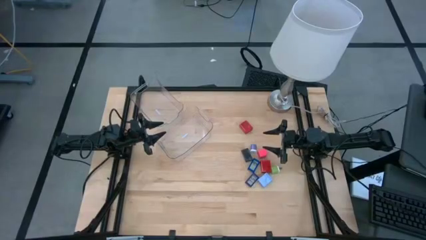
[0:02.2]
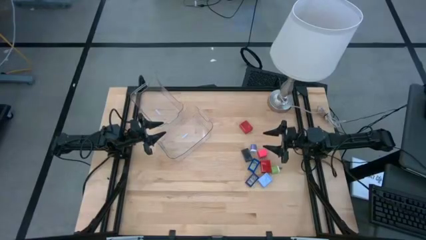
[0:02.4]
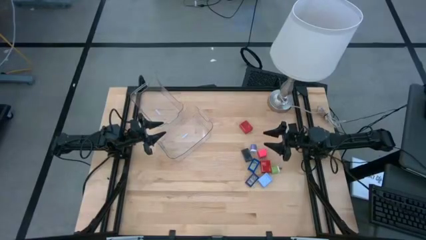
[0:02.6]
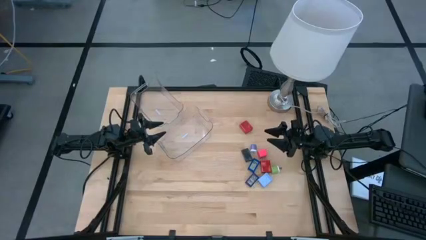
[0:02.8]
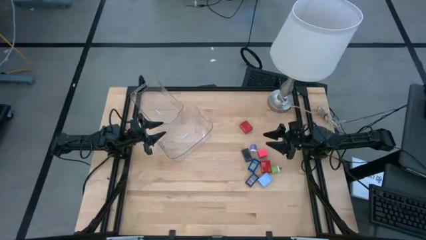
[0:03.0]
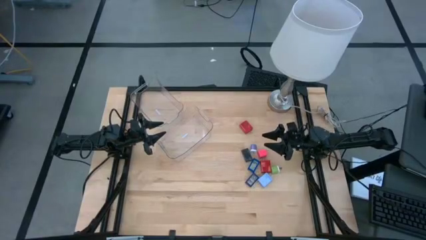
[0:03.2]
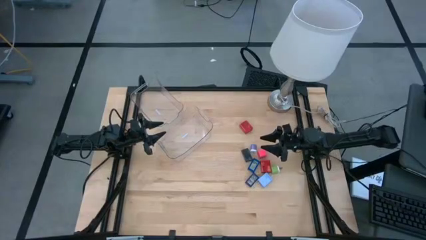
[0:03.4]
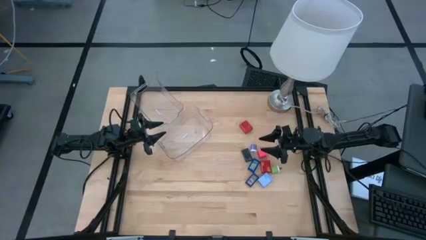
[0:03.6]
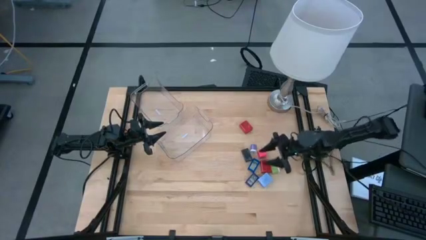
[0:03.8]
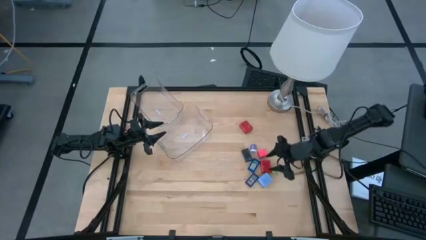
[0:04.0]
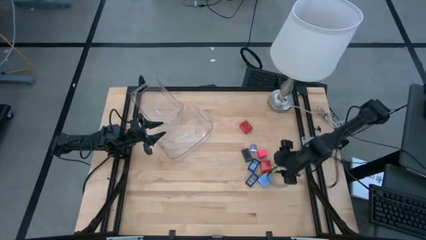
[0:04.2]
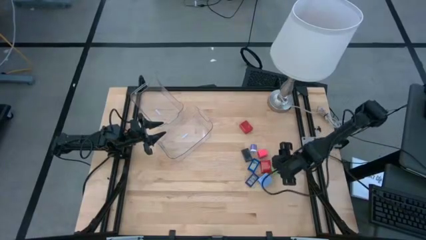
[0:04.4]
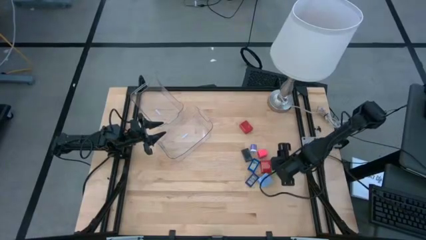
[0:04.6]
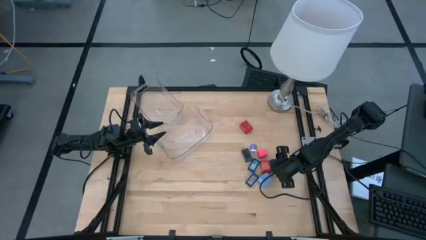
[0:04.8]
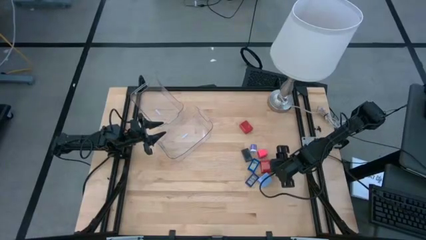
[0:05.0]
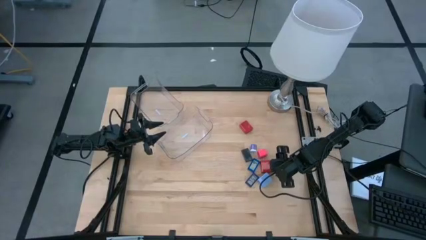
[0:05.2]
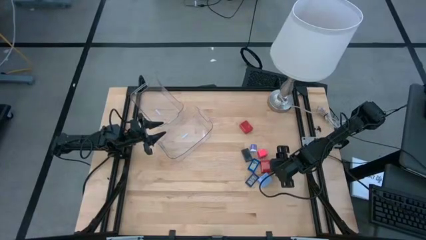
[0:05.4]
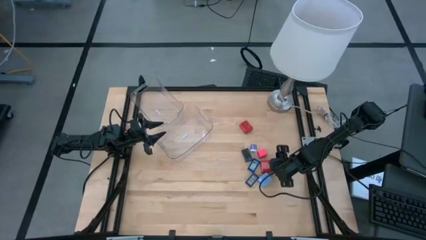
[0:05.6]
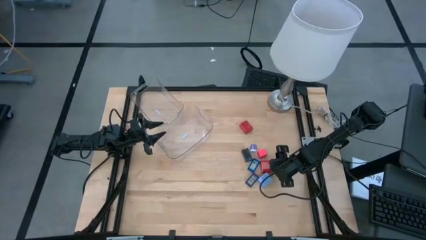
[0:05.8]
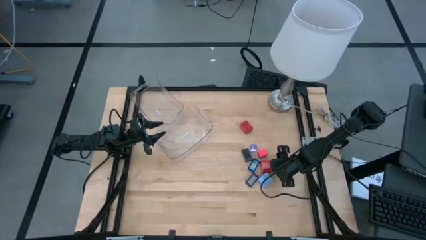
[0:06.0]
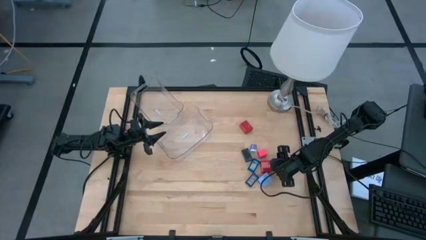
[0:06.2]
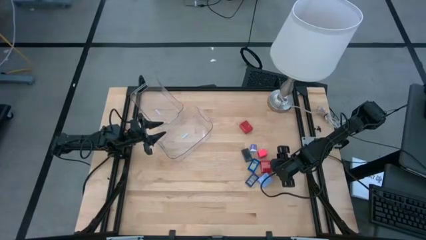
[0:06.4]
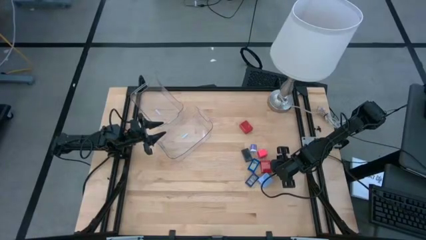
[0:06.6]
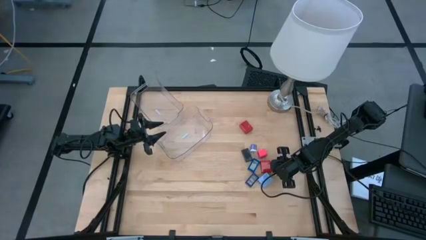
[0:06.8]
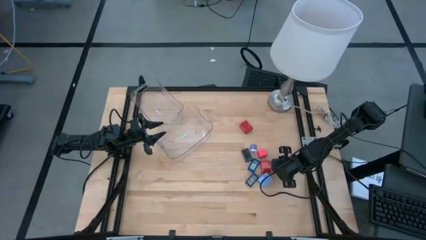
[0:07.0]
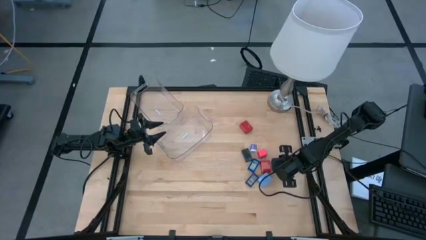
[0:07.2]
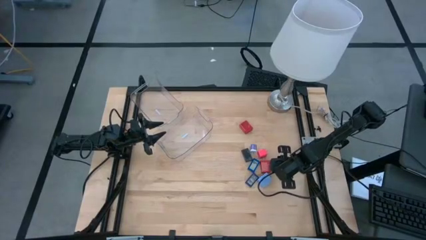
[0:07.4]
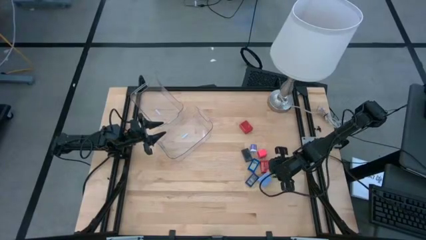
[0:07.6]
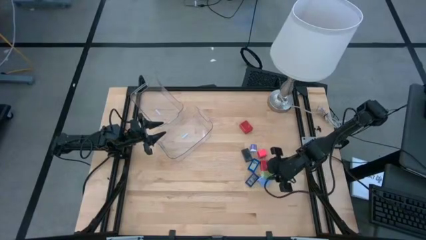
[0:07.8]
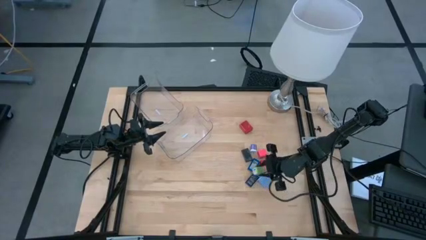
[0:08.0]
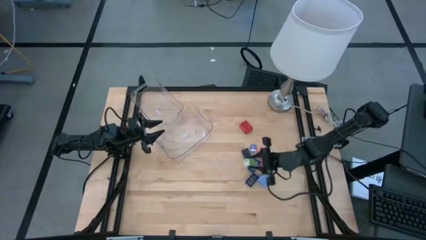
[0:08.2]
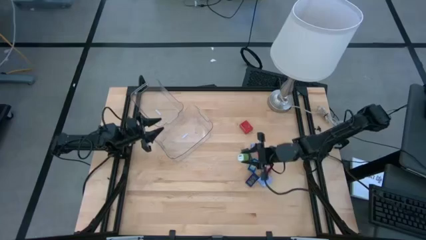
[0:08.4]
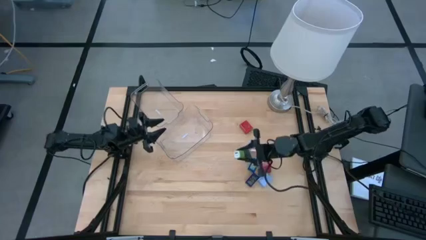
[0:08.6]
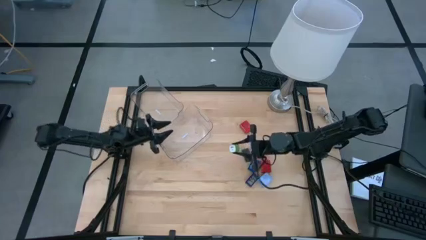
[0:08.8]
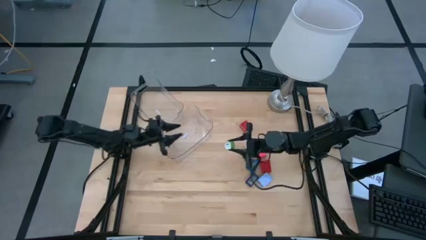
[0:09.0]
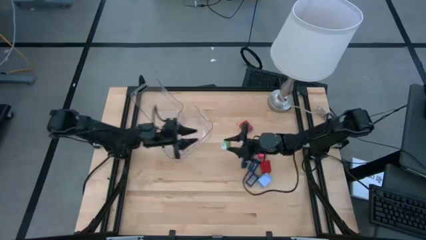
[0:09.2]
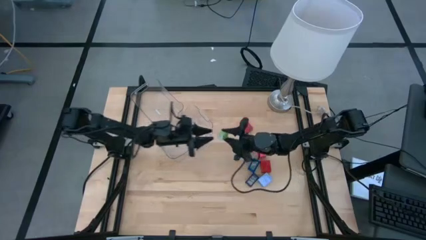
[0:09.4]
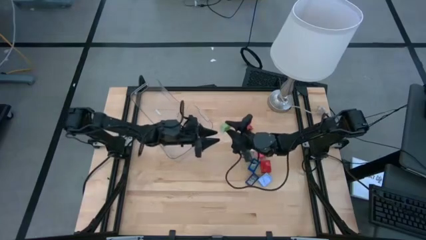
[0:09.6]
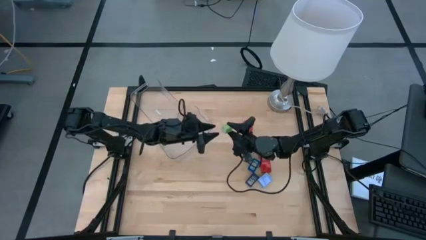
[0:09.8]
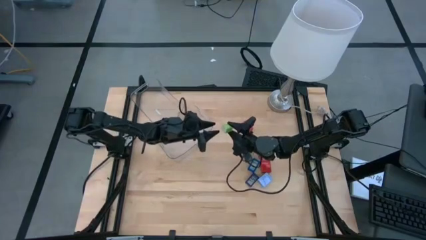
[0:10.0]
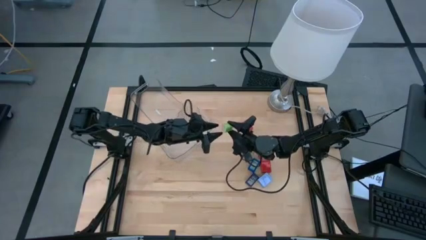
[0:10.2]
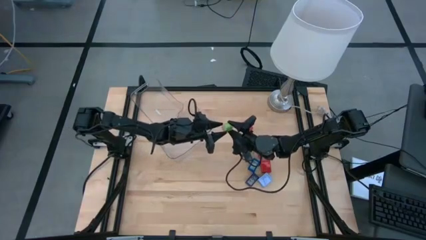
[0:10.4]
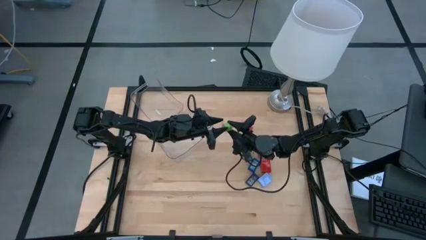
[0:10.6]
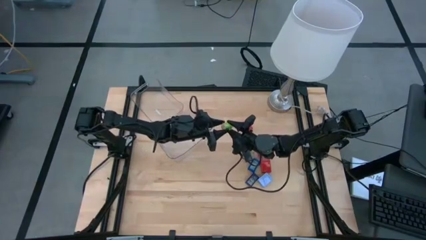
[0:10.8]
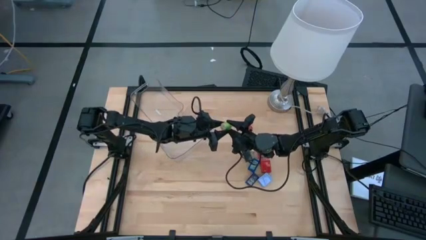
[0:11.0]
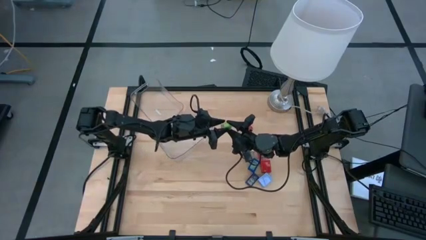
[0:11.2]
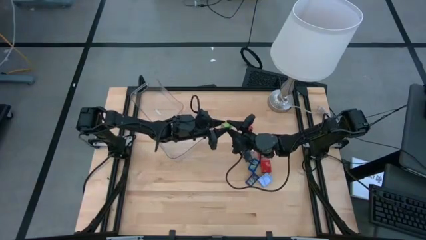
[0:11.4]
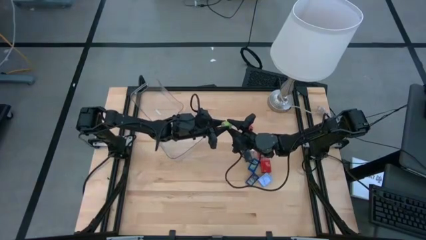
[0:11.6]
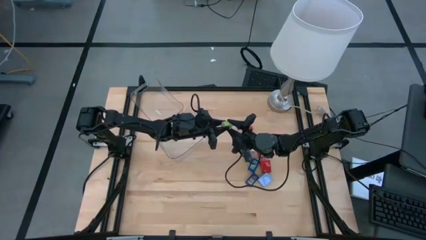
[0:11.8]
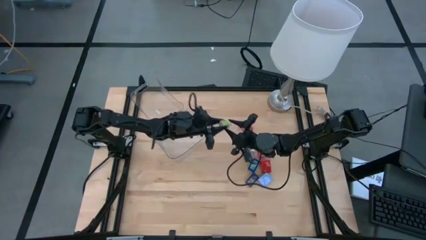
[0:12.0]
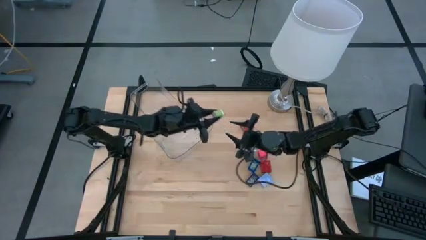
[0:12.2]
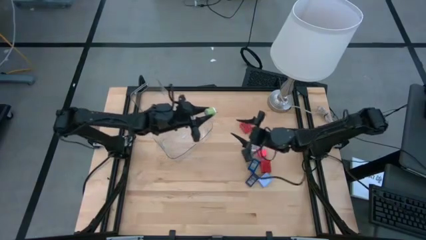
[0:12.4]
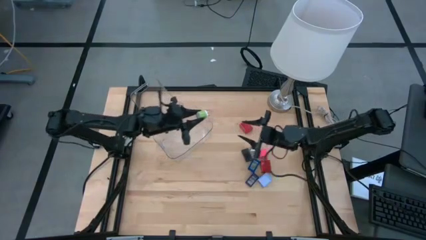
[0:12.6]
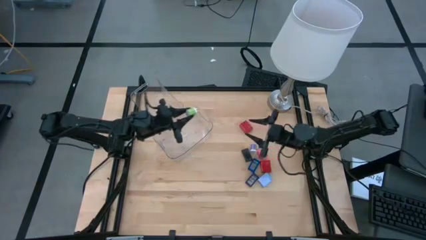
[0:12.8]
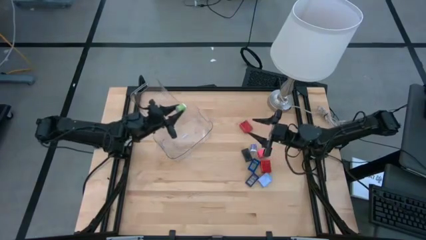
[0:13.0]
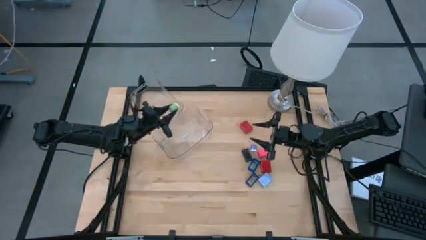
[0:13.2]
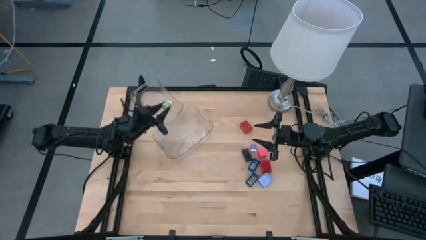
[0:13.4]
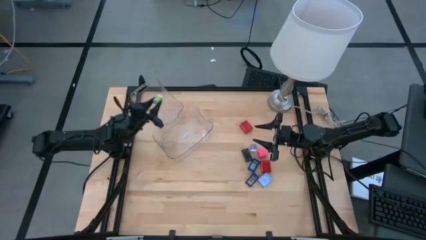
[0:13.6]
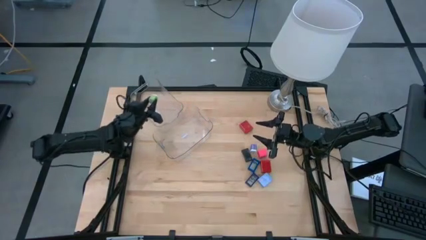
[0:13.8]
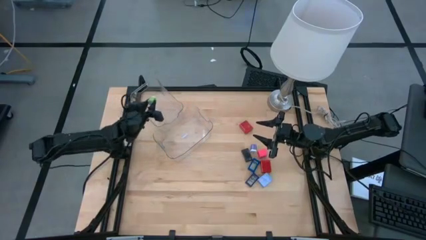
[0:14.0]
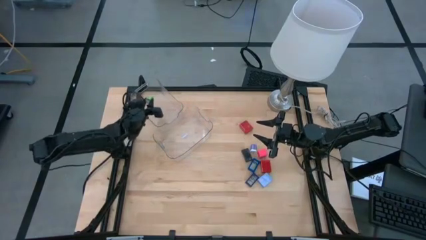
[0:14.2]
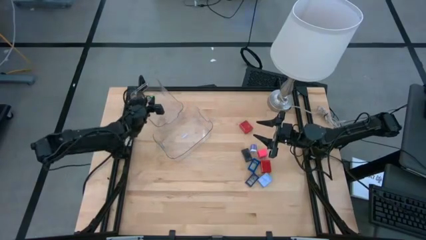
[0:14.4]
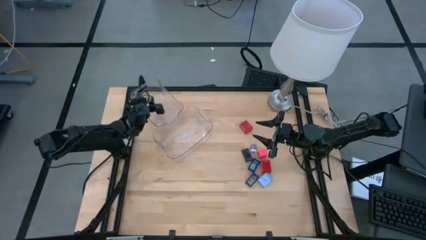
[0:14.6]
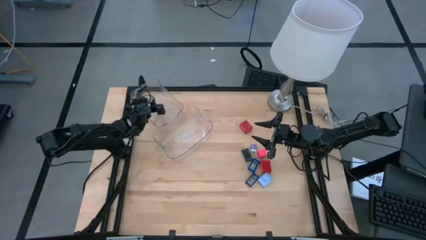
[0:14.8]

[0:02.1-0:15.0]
Task: Pick & Place Office items
Put the green charger adapter into the top transparent bin
